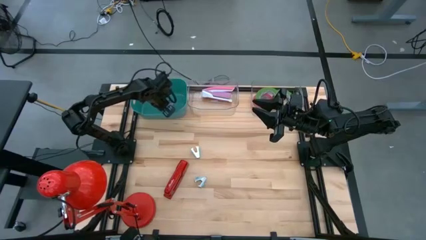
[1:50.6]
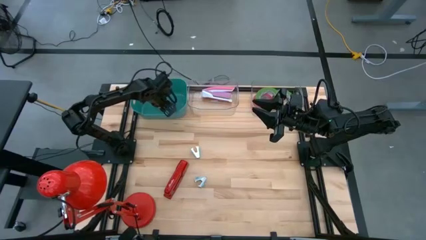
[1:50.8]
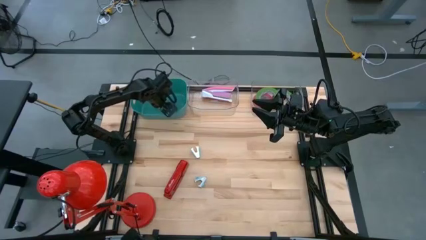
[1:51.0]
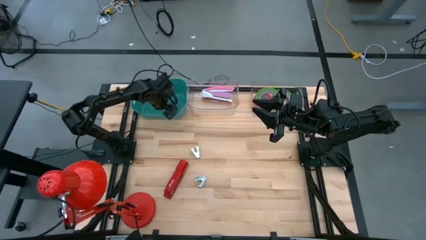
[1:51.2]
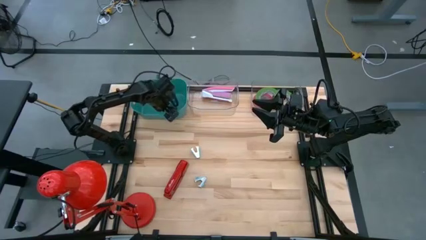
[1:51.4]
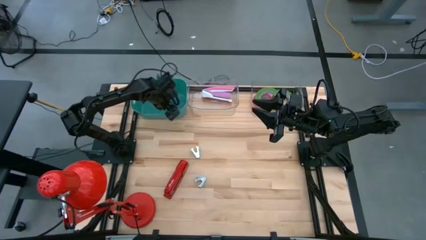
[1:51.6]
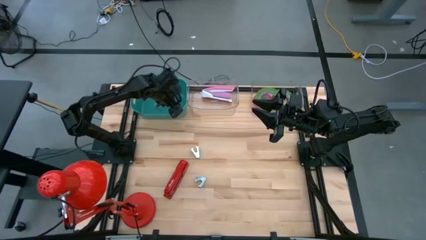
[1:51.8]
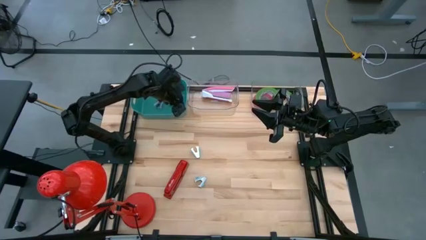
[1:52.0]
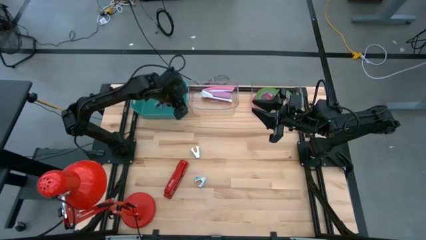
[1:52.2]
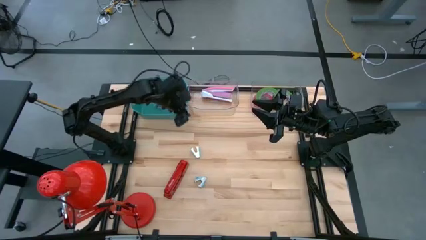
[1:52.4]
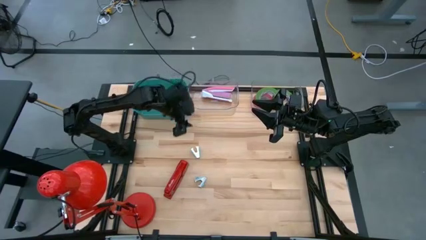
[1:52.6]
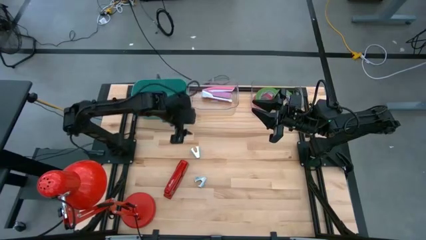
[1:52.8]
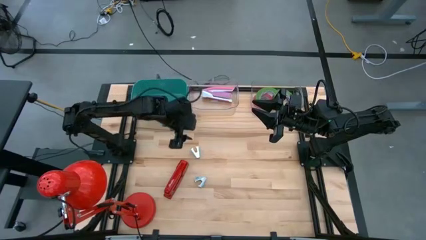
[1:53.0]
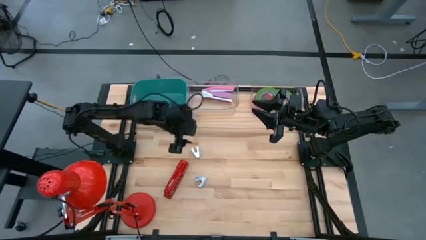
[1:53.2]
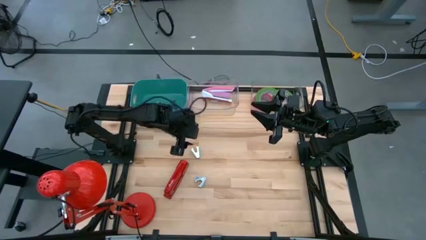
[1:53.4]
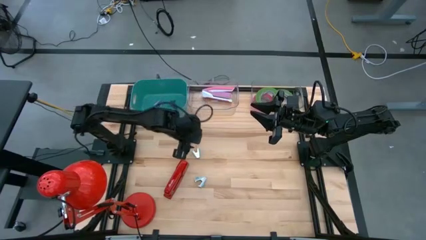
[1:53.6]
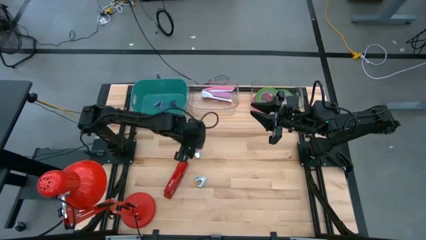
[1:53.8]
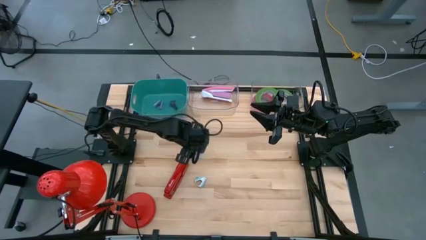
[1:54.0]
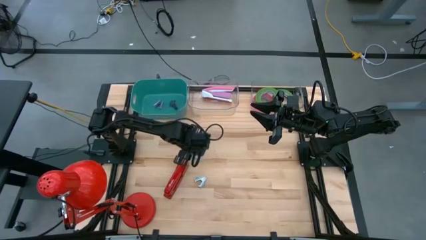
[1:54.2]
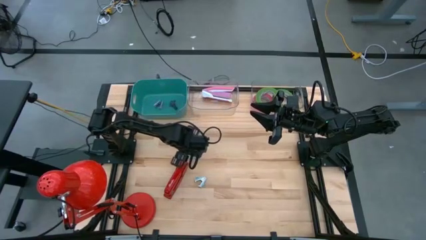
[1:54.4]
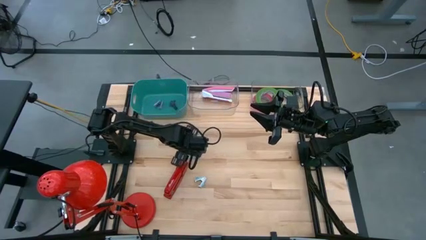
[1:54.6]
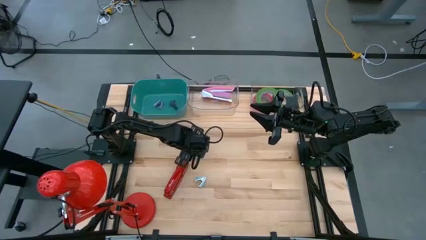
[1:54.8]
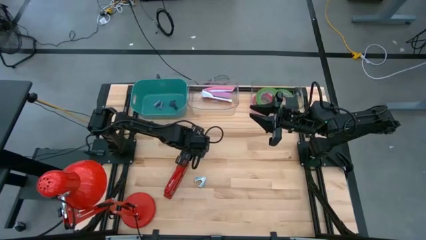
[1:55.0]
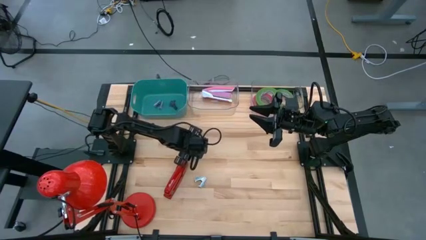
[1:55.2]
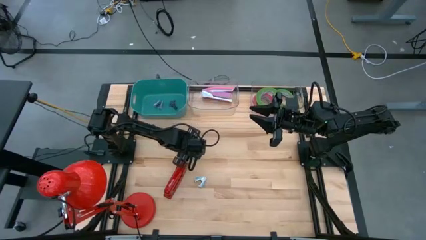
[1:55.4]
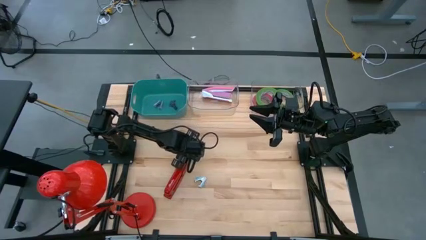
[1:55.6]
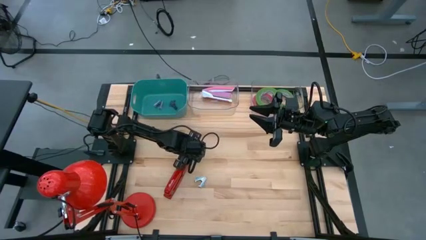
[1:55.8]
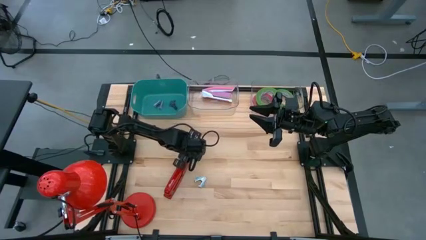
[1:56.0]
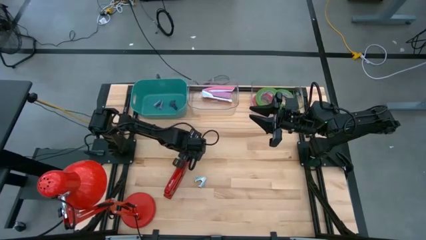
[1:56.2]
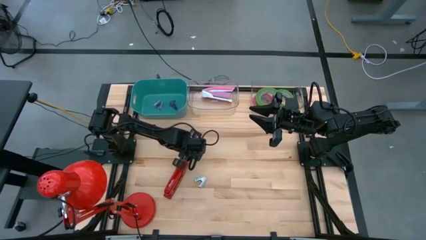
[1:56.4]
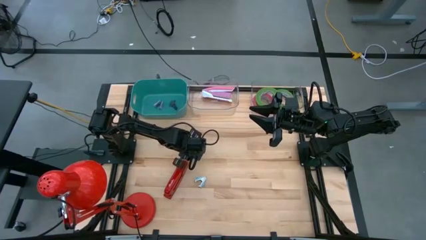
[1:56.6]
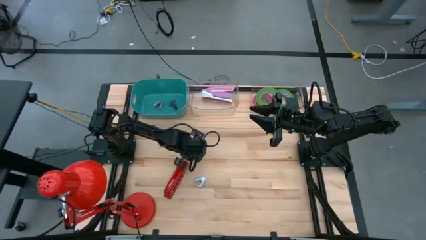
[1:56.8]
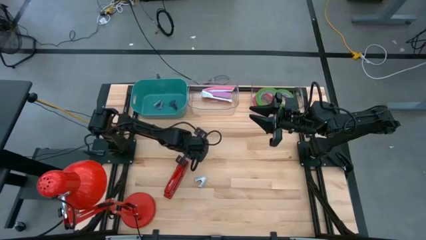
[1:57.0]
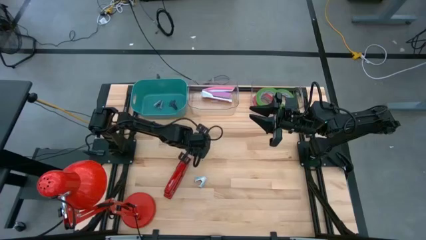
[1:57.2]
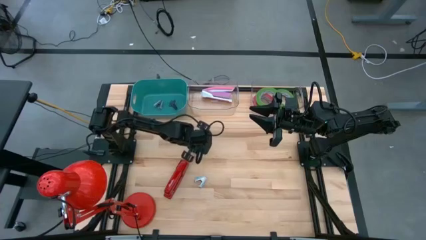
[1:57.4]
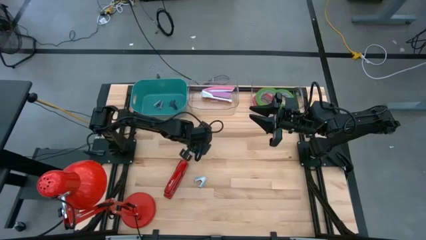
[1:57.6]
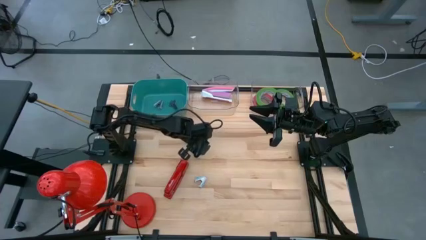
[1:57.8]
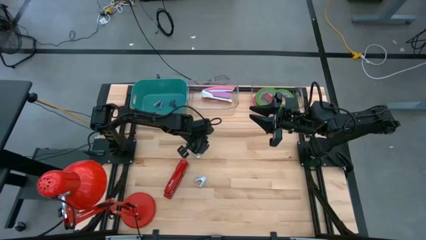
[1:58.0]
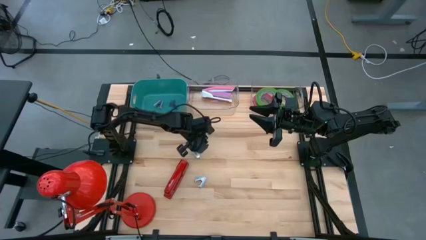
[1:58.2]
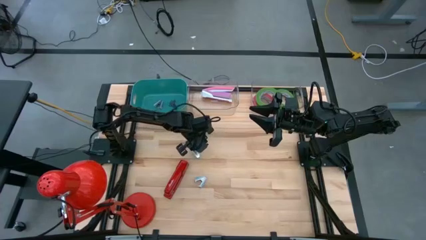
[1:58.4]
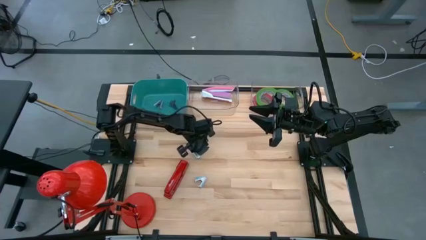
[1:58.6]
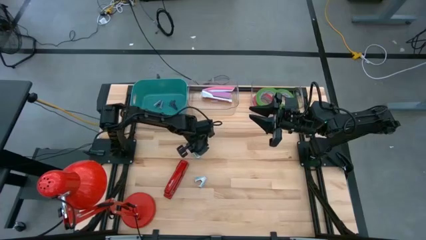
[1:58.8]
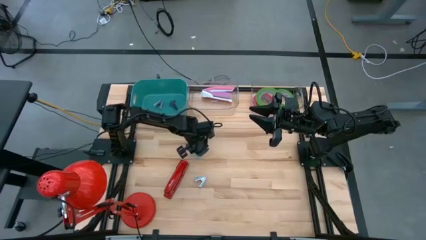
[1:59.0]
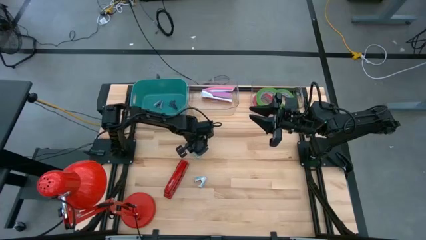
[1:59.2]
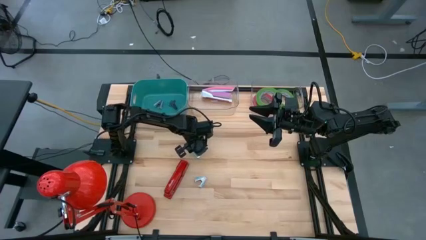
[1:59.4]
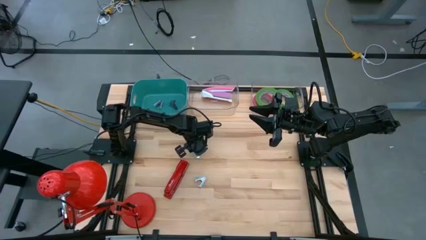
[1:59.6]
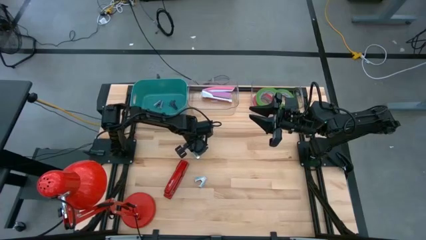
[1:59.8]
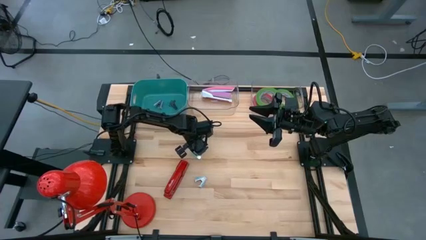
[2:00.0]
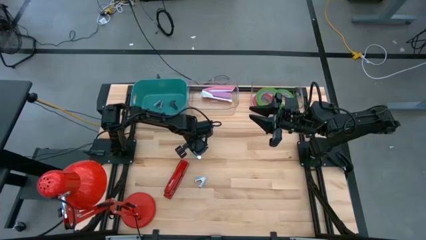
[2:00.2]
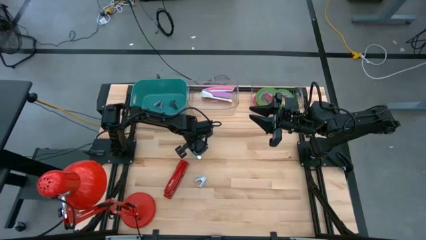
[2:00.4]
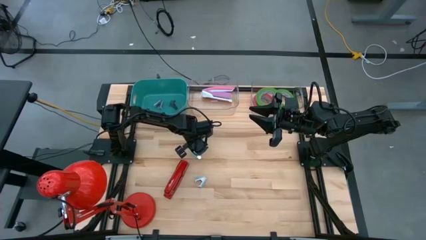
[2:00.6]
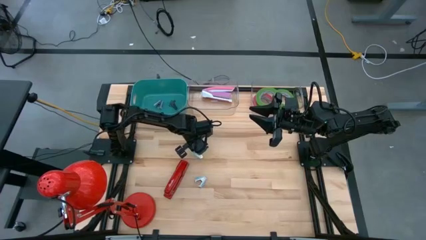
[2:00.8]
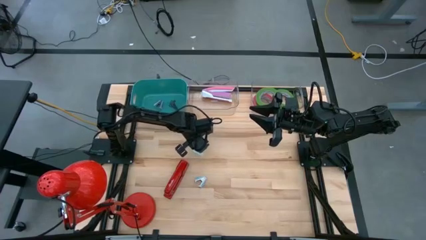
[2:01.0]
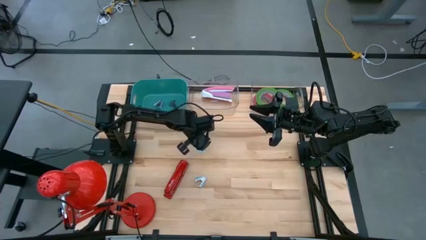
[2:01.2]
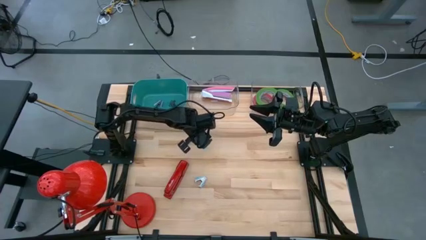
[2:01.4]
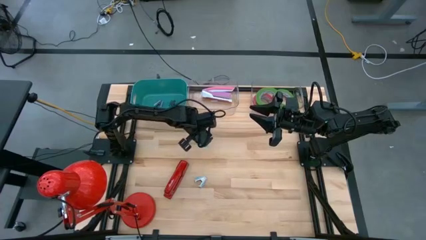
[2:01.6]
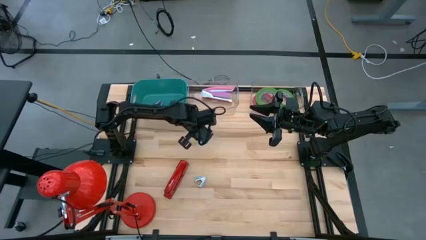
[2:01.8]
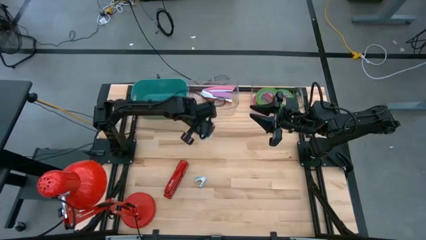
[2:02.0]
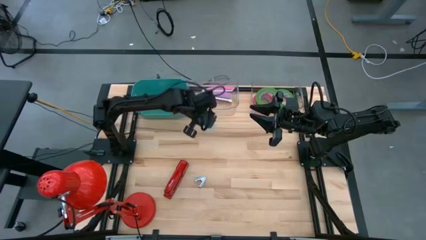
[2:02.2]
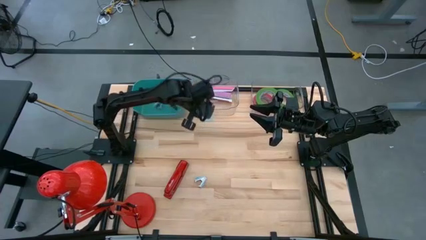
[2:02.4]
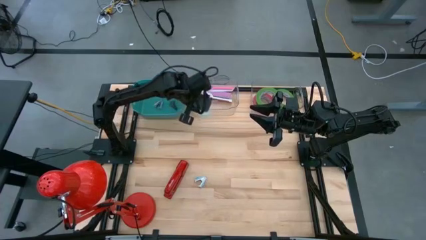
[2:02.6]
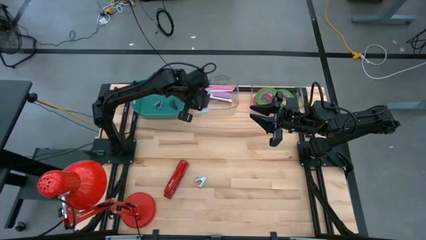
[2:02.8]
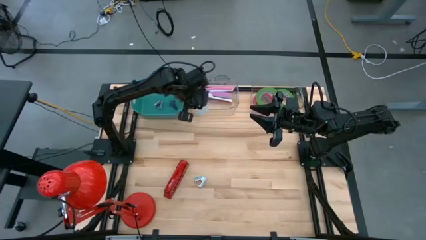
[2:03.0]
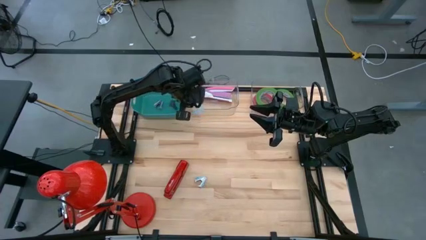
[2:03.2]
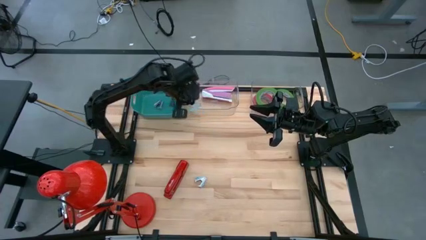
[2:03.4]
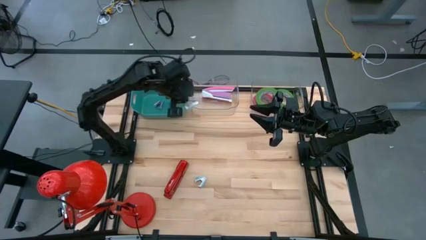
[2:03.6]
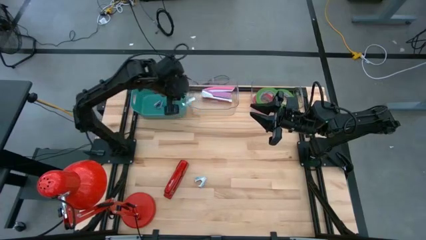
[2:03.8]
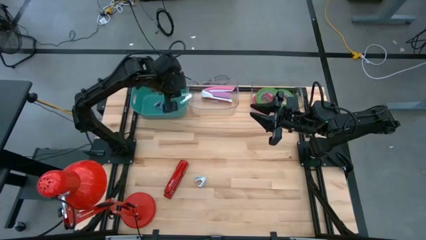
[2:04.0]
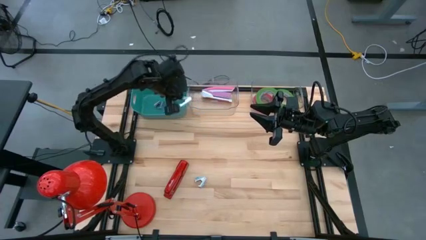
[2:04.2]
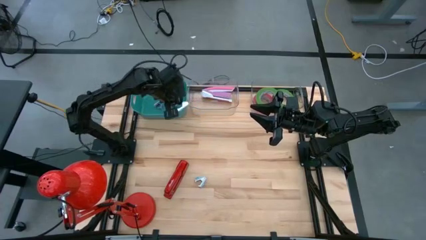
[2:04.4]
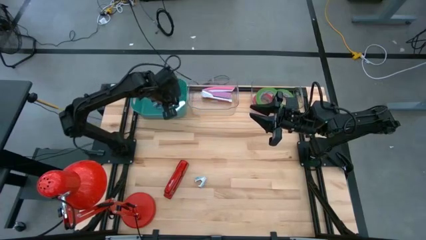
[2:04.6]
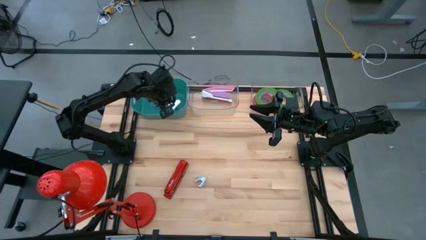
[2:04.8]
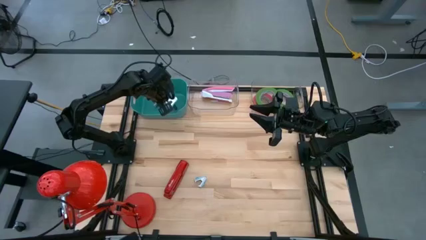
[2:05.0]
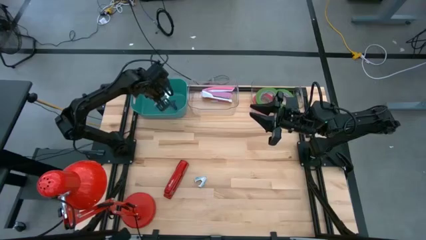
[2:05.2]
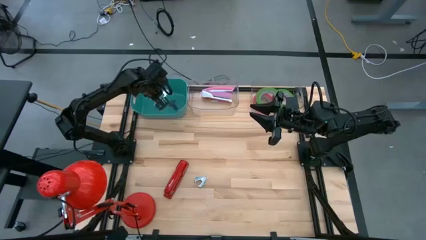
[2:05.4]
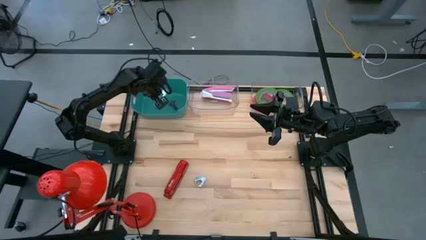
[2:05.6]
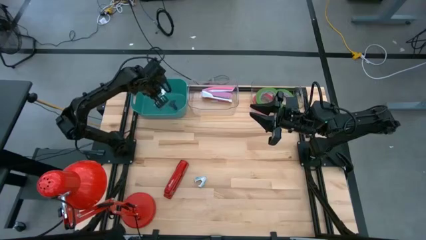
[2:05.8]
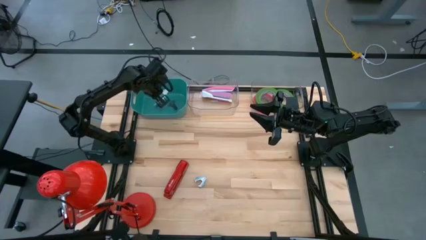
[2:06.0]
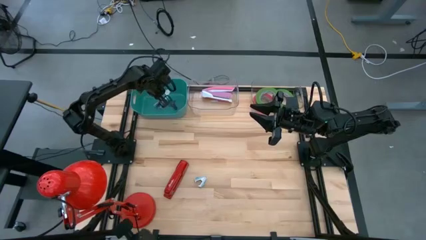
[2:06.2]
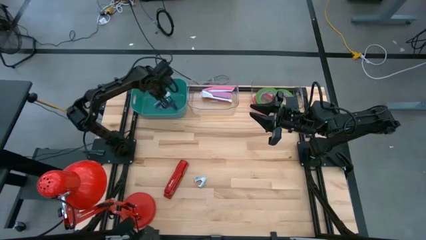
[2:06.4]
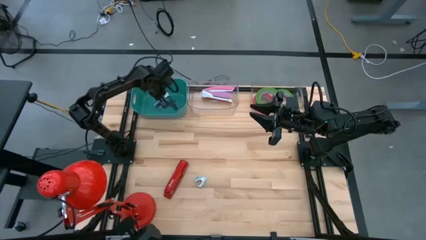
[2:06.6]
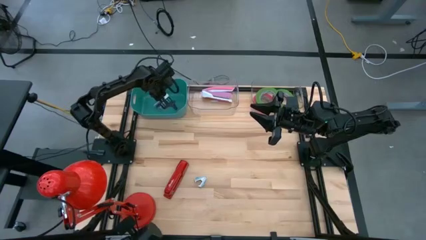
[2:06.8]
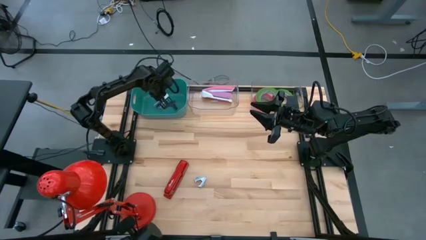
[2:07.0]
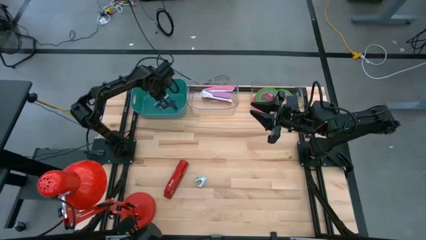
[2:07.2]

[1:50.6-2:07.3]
Task: Pick and place Stapler, Stapler remover, tape
Put the sky blue staple remover into the blue bin
